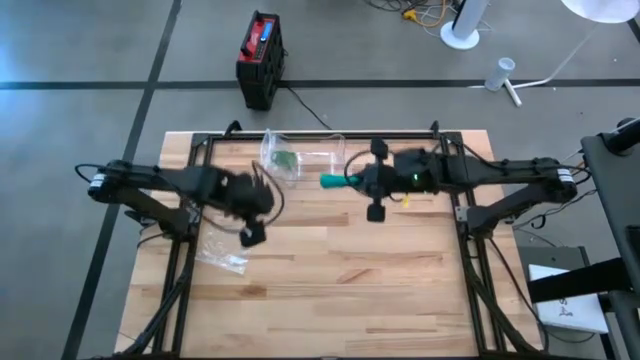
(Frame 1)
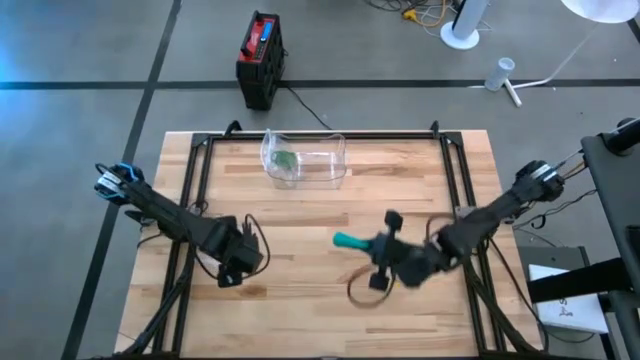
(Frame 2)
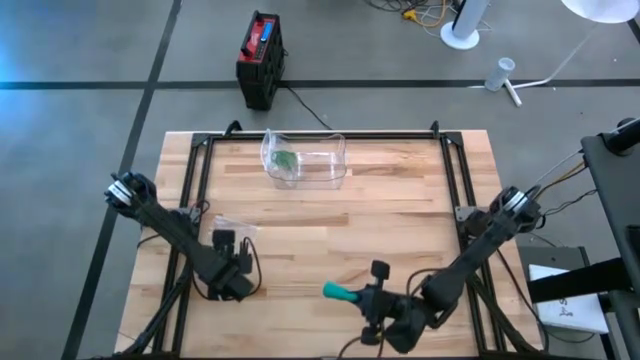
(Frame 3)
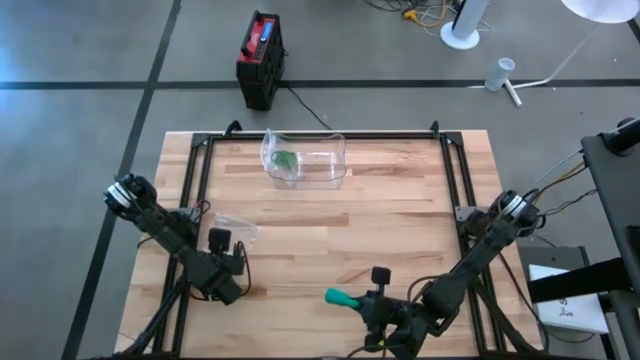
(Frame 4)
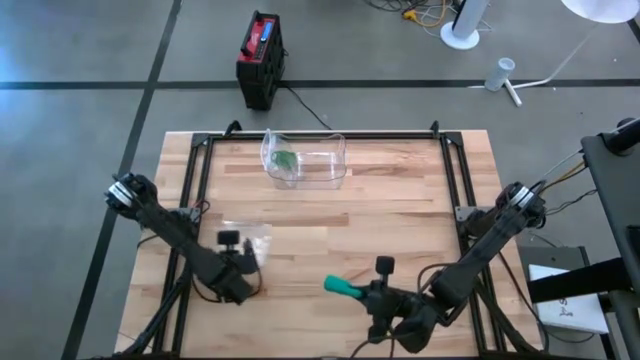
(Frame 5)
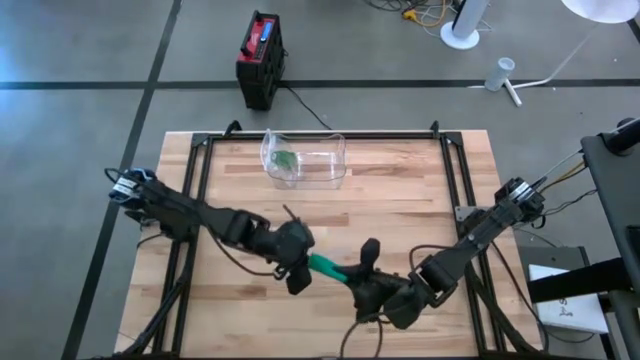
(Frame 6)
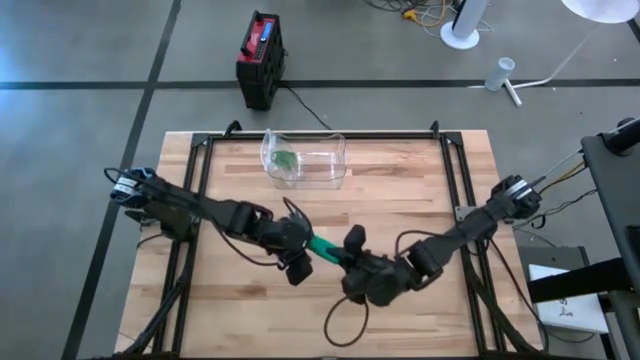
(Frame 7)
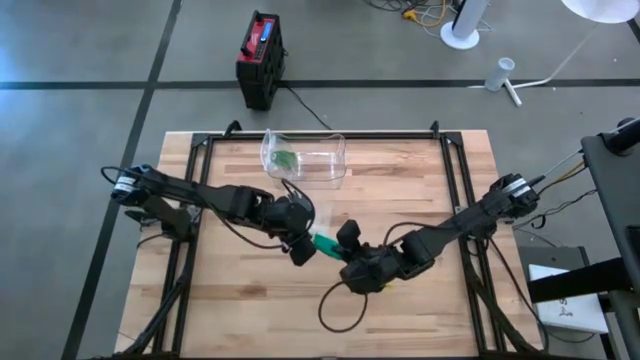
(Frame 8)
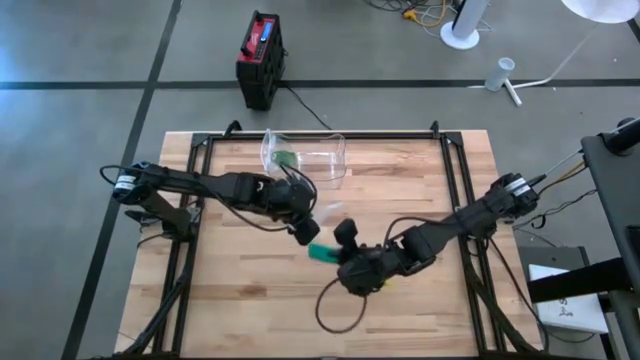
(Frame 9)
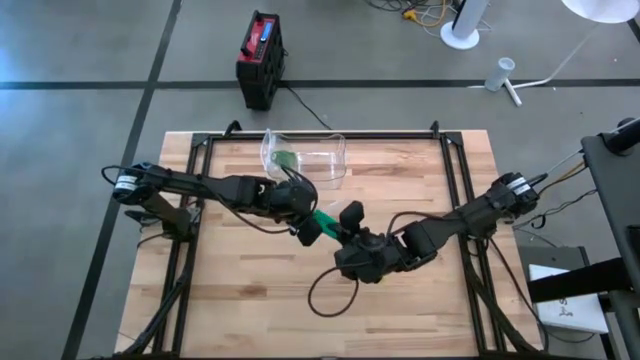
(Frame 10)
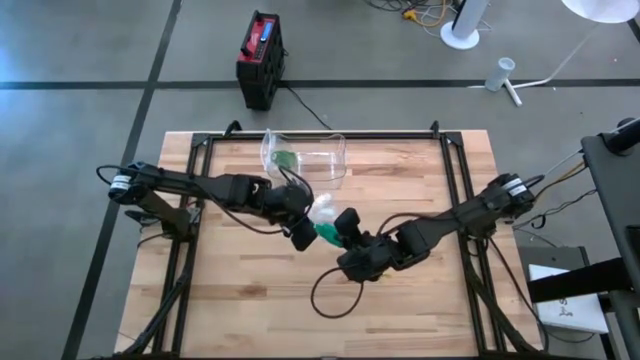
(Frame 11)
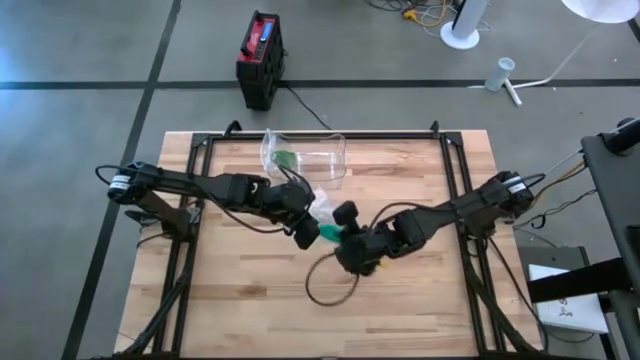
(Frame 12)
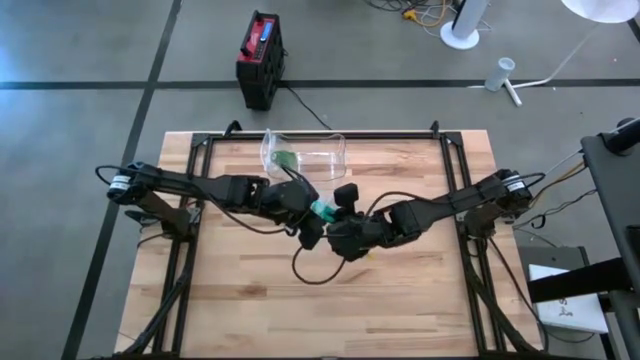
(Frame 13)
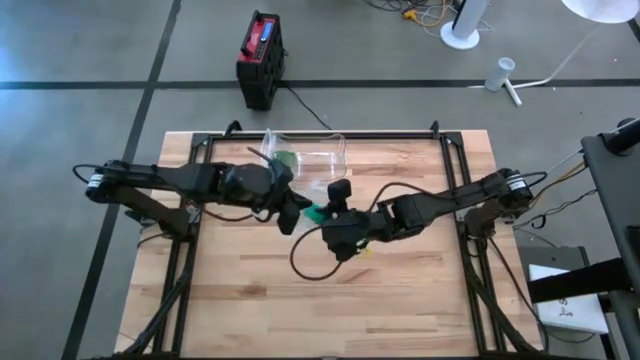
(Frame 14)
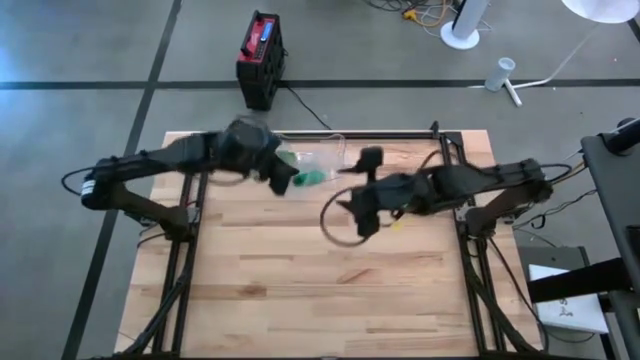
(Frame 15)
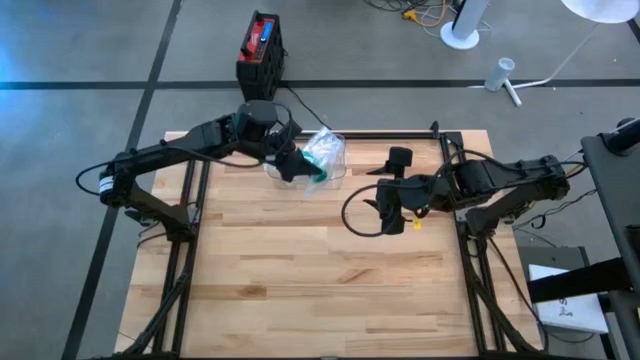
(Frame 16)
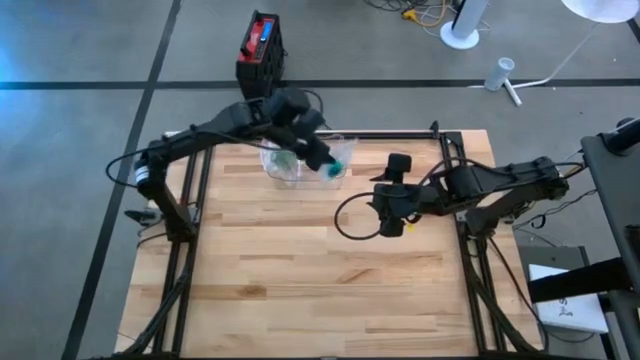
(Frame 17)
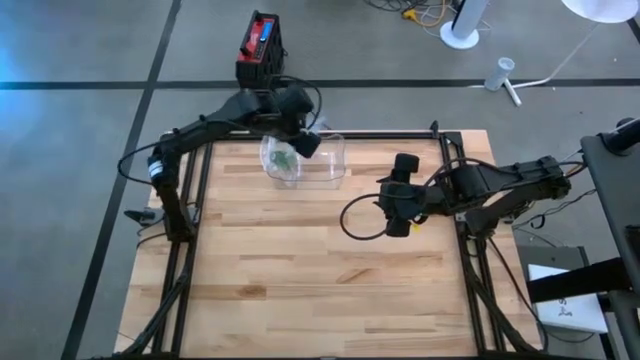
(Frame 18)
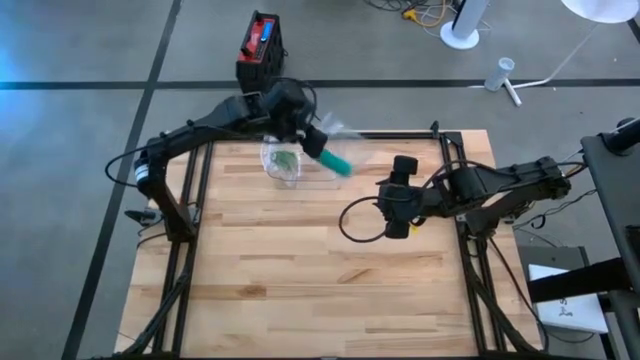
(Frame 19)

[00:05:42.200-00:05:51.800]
Task: Roll bandage
Put the folded blue bandage into the transparent zip bag

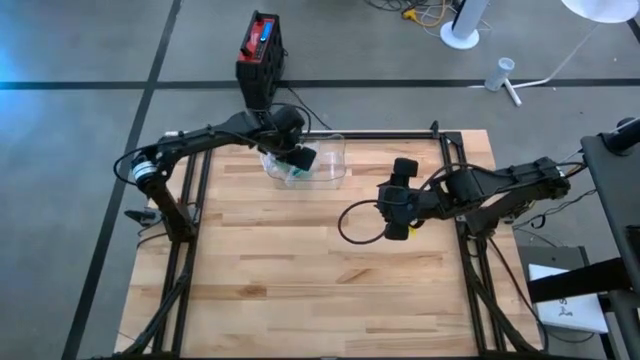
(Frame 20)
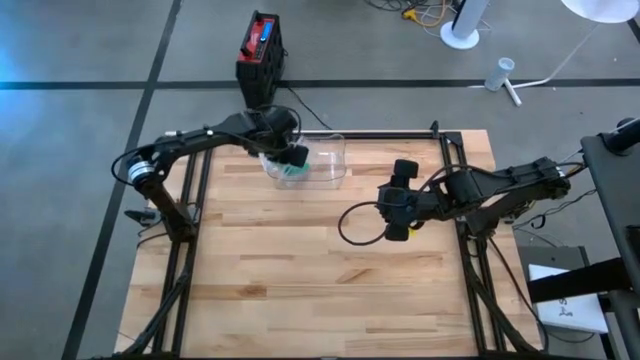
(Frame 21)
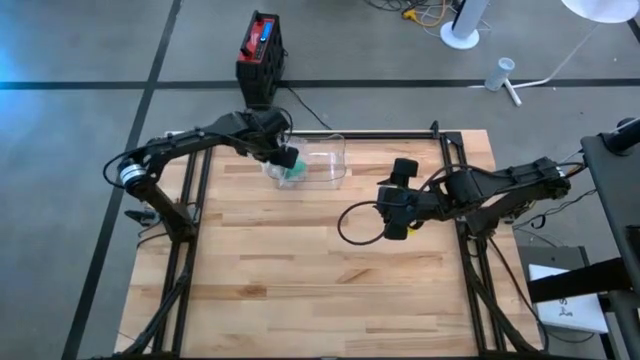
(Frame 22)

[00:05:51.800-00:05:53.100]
Put the transparent zip bag containing the blue rolled bandage into the transparent bin

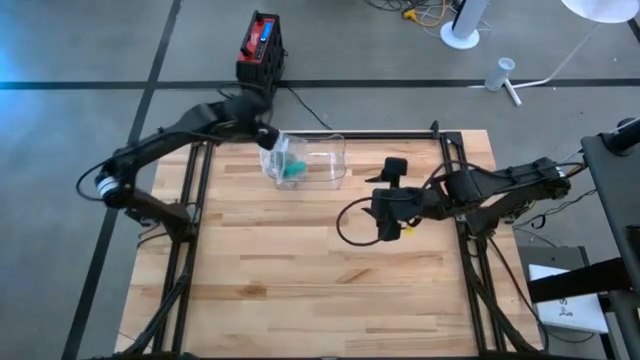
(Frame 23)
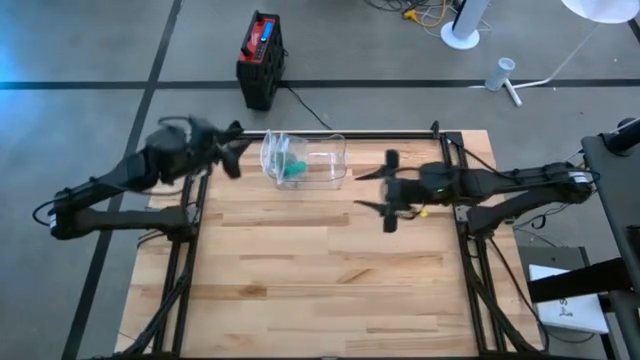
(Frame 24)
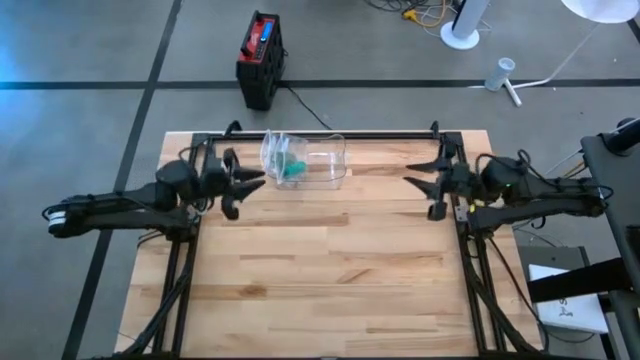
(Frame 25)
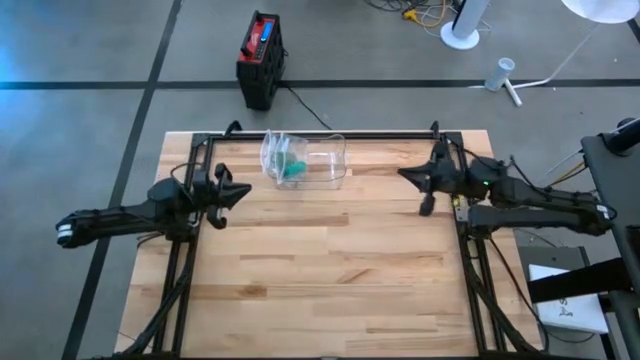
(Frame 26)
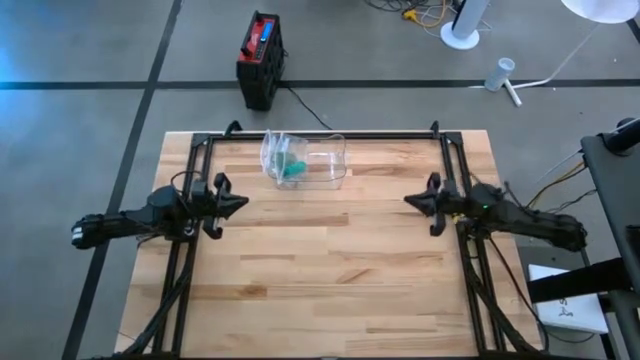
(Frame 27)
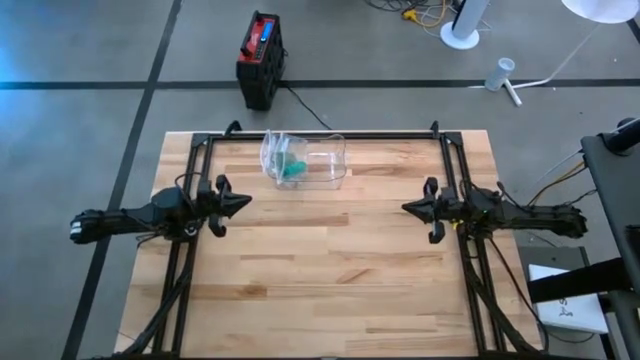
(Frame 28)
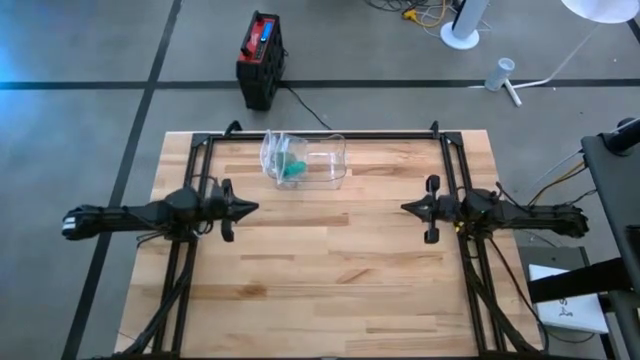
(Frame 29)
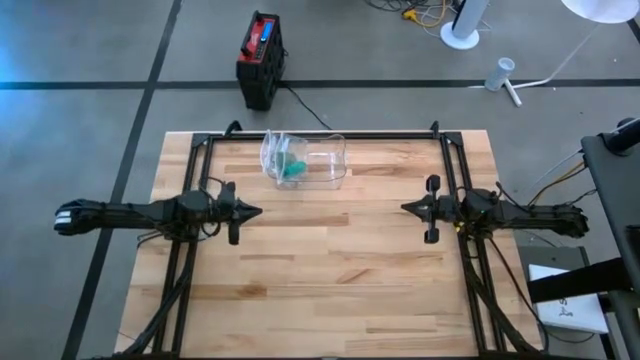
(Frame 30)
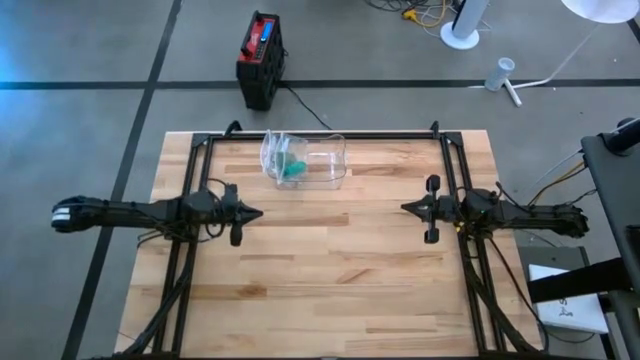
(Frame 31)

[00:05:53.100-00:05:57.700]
Return to Home Position
